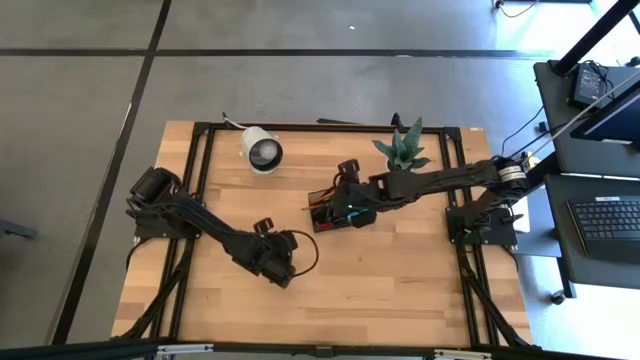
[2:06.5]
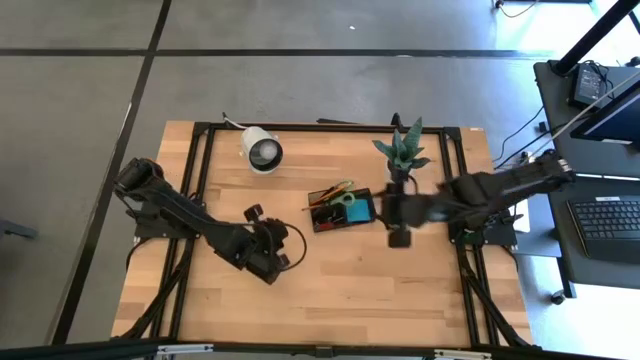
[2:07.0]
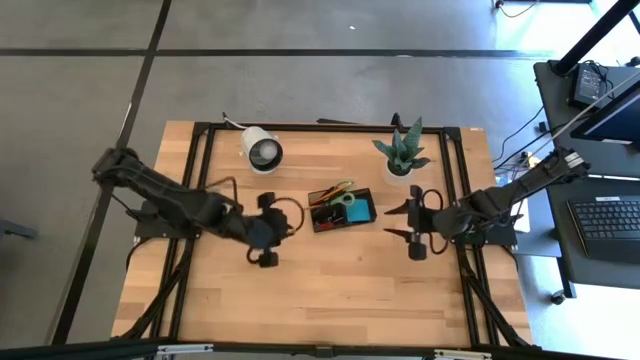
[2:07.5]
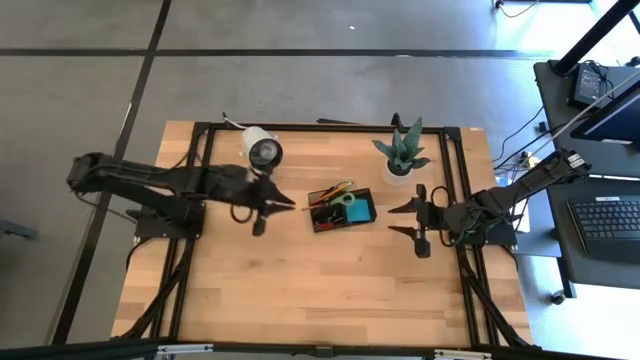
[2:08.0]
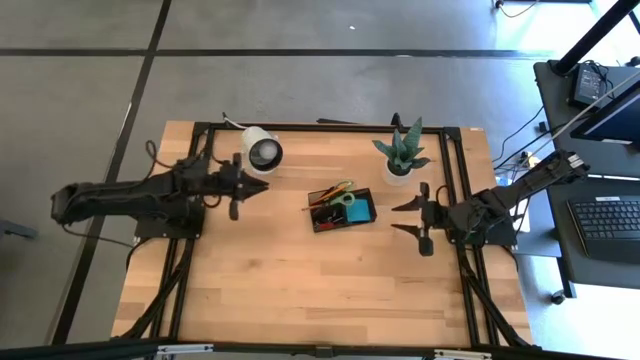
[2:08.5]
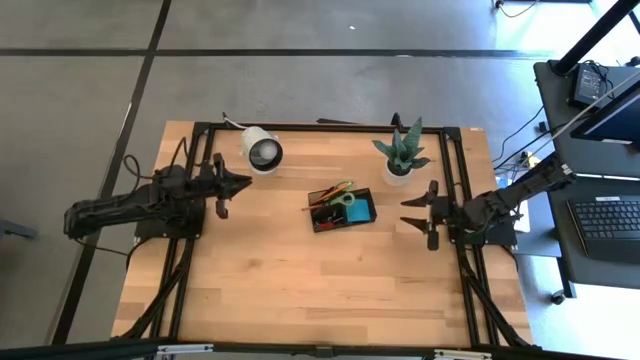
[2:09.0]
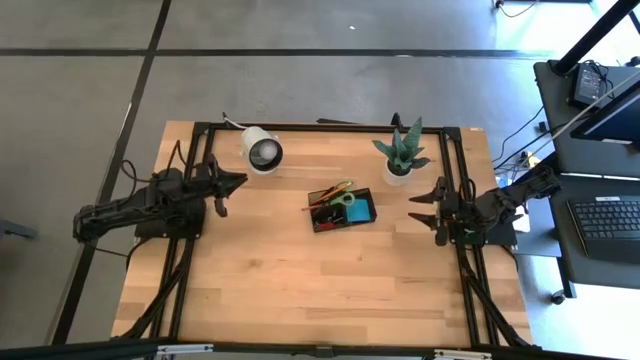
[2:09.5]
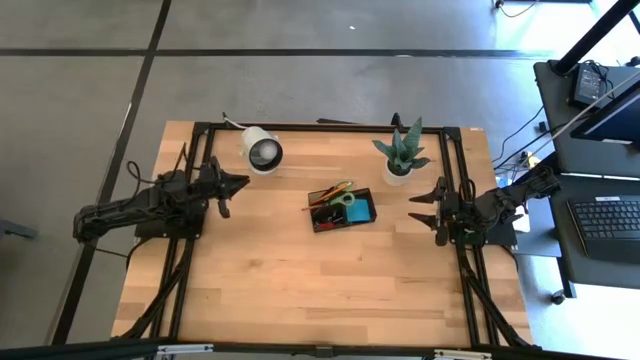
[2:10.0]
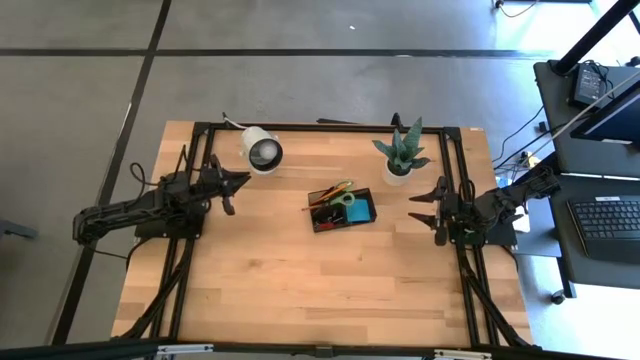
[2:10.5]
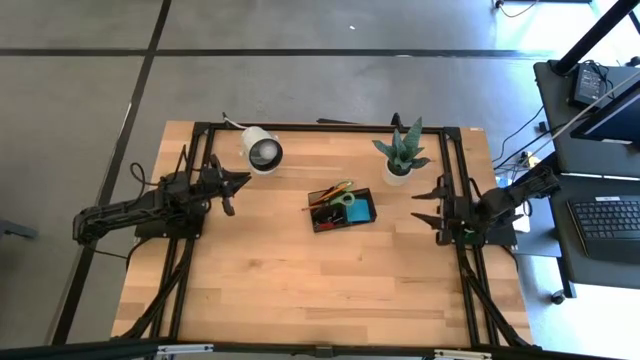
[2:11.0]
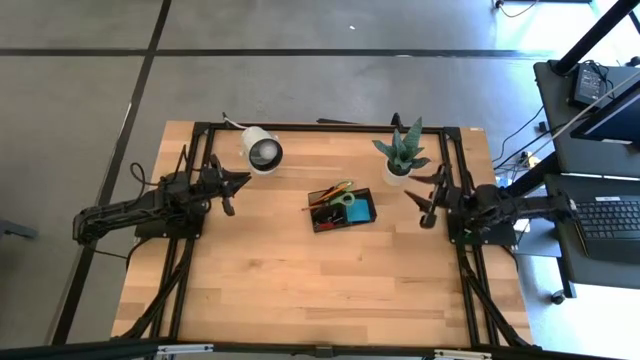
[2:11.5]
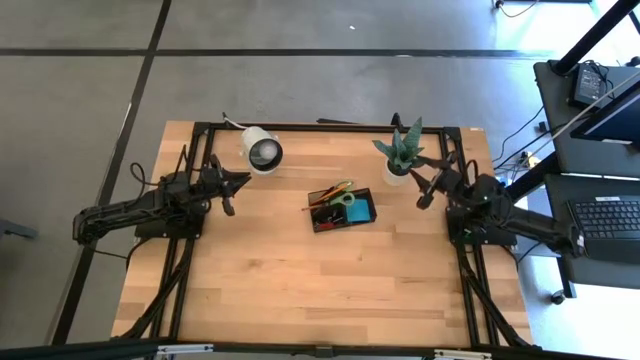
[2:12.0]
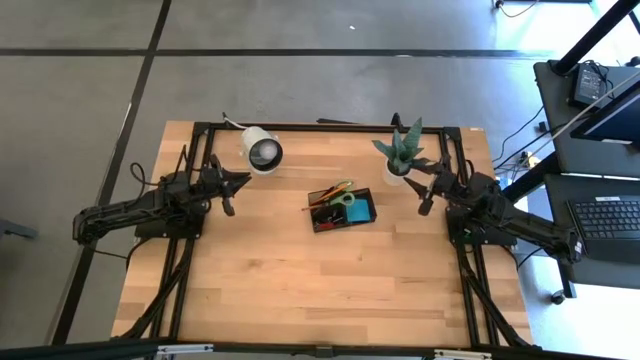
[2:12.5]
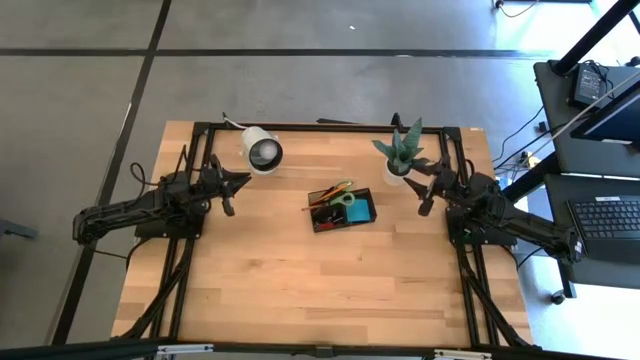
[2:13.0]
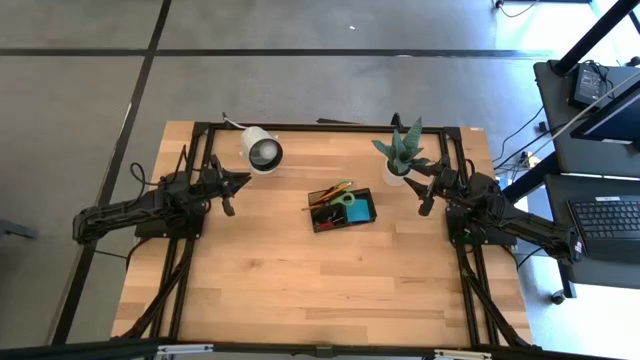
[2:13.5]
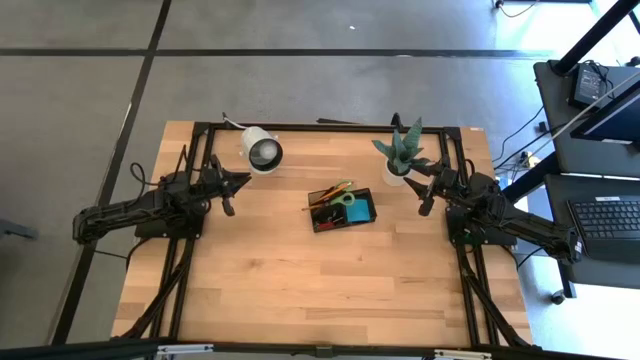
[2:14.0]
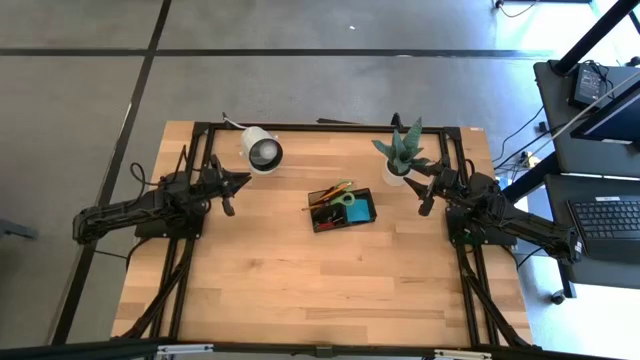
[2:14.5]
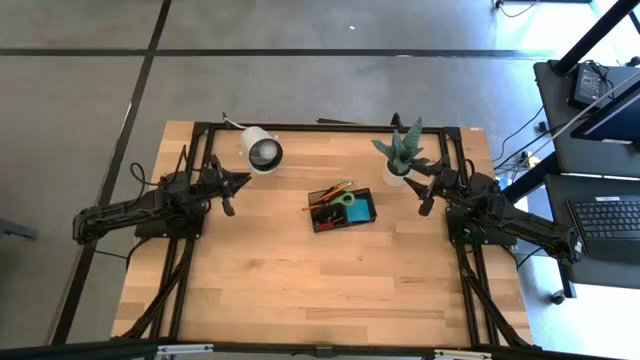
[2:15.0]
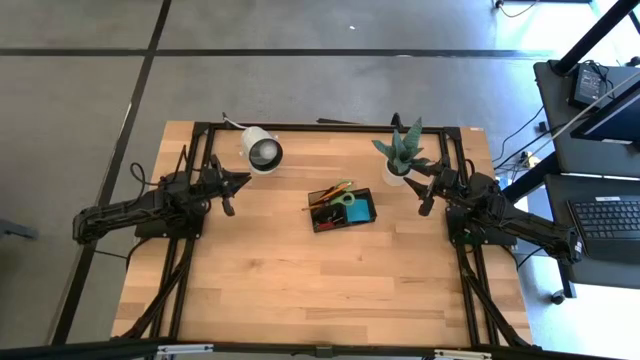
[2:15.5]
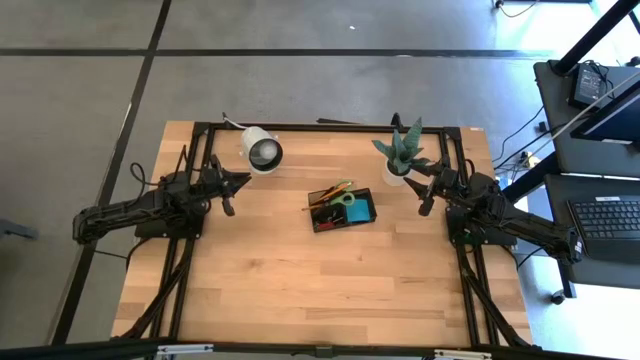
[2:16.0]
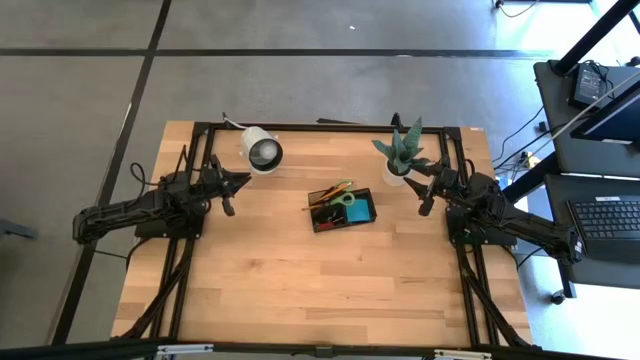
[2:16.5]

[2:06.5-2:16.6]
Task: Pick and place office supplies into organizer
Return to Home Position

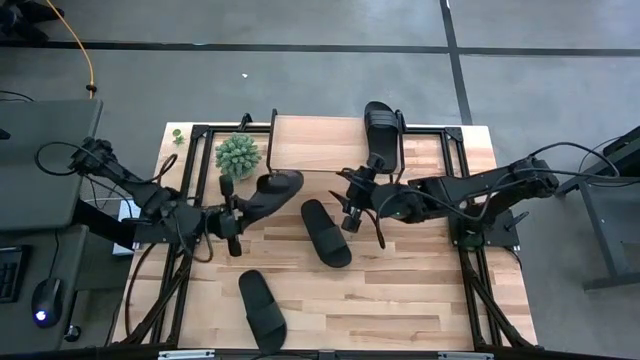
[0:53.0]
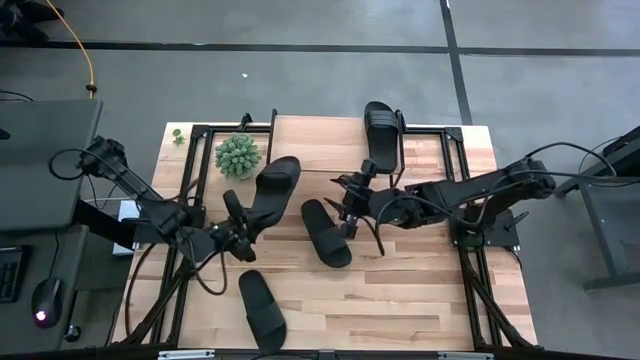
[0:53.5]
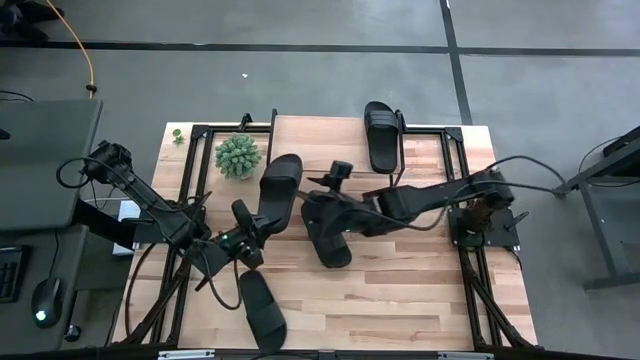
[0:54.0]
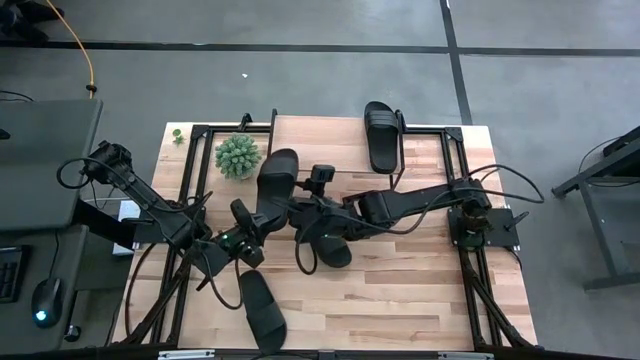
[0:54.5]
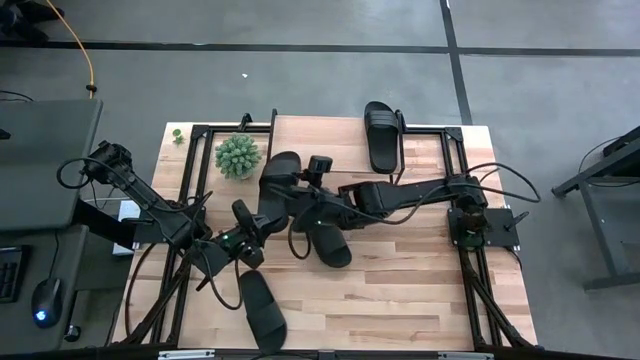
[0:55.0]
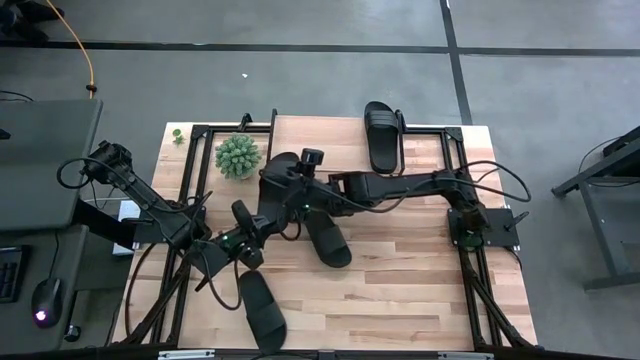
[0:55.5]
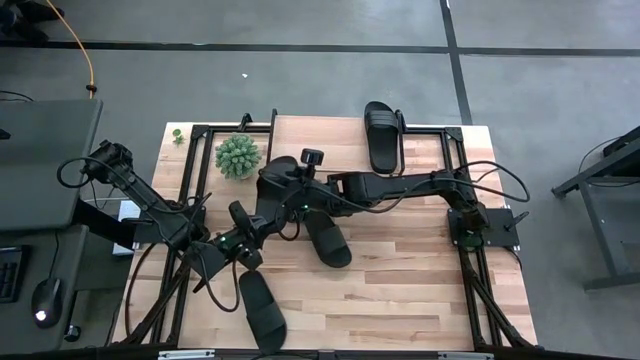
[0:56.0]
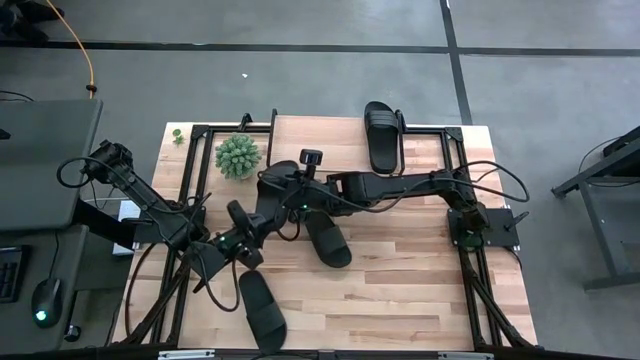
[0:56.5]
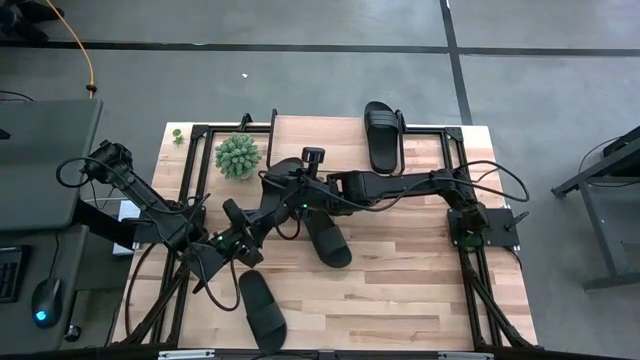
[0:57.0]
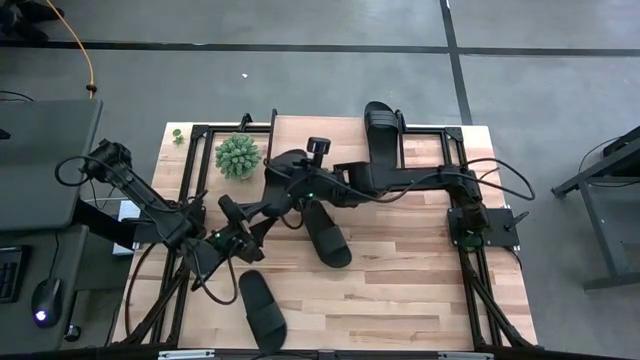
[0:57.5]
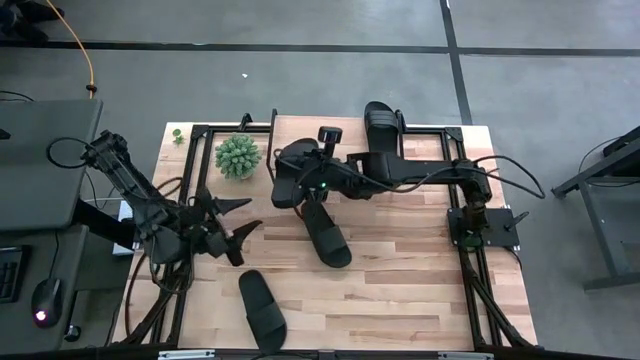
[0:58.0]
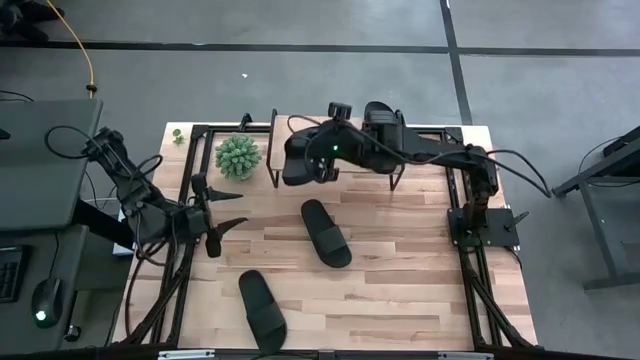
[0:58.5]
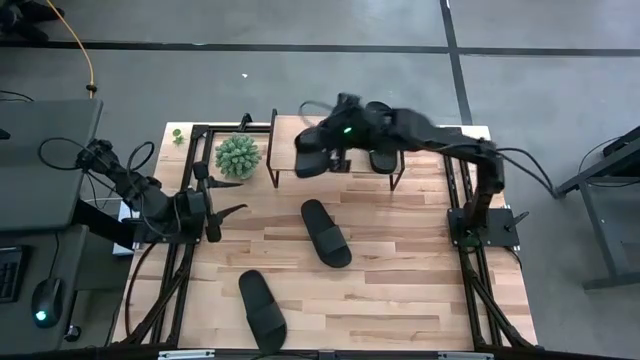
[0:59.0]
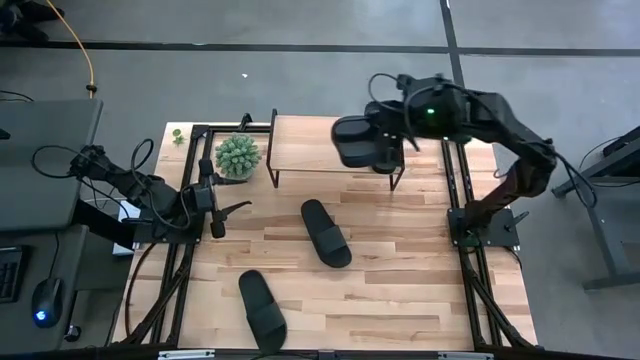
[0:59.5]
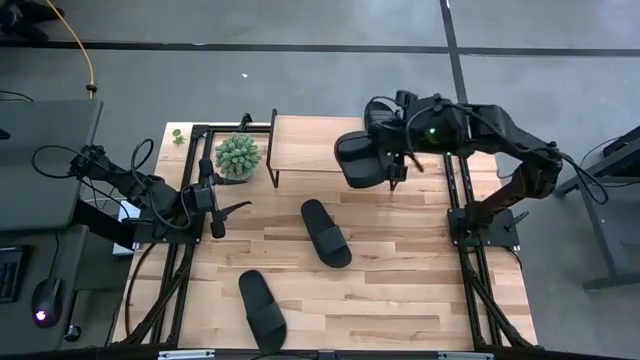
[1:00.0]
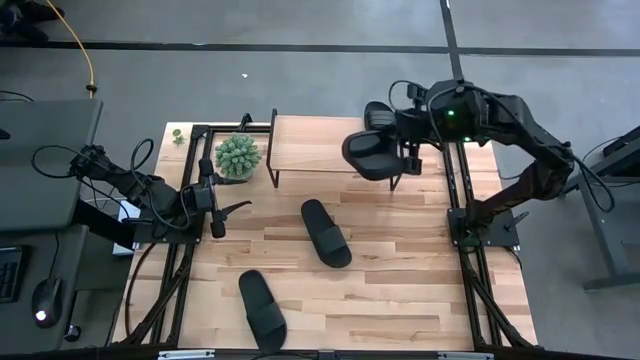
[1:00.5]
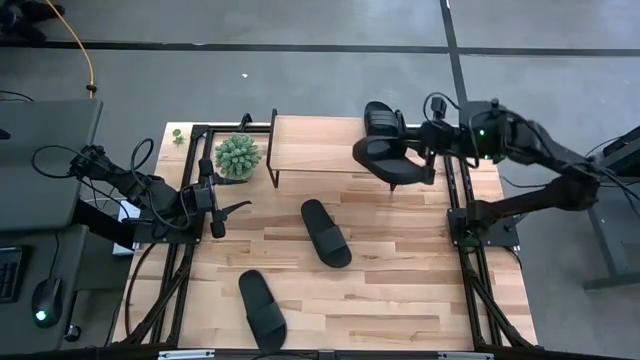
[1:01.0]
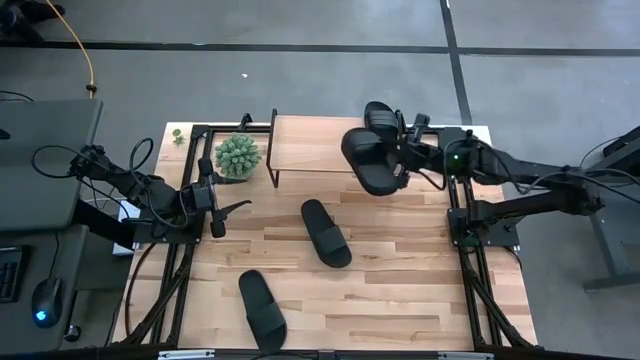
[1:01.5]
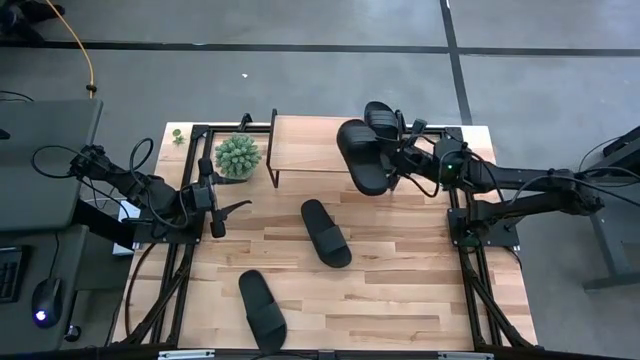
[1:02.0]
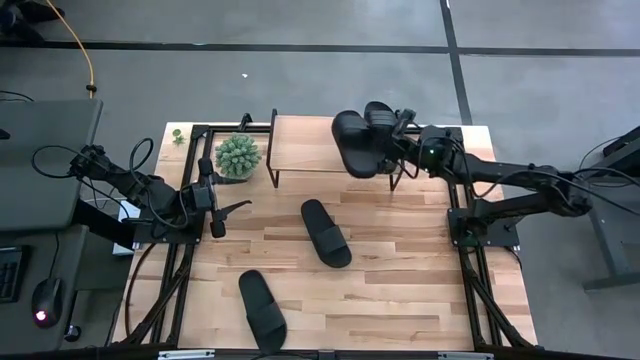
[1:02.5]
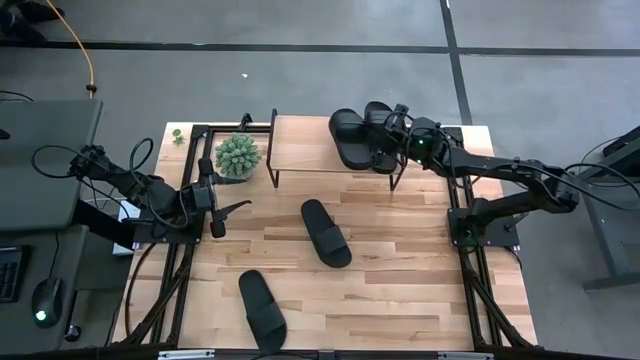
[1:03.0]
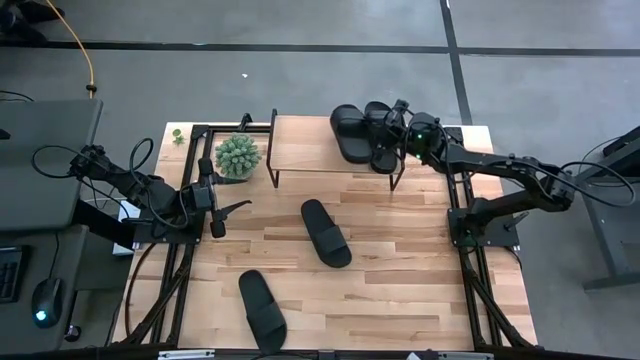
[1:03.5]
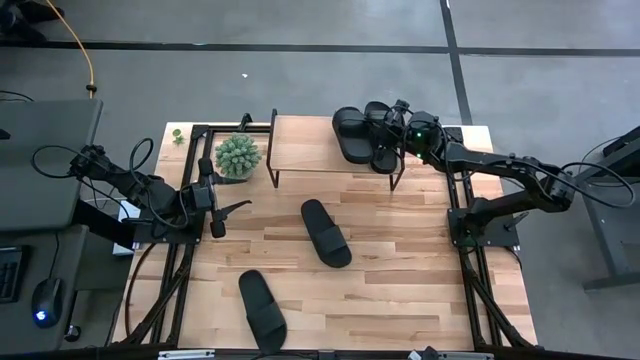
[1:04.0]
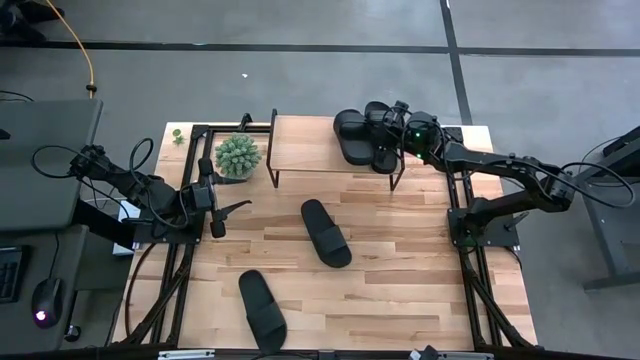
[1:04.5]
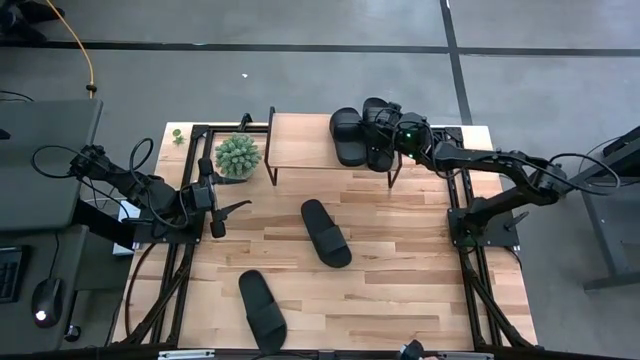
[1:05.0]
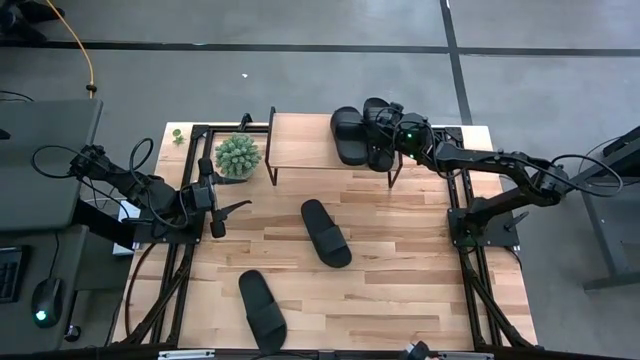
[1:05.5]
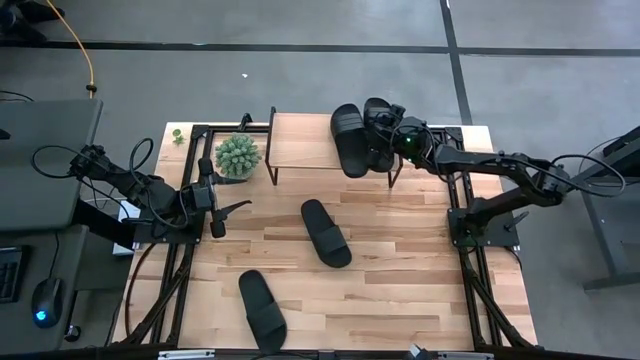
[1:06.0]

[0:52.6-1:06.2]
Task: Pick and place slides into the shelf
Put the black slide on the shelf
